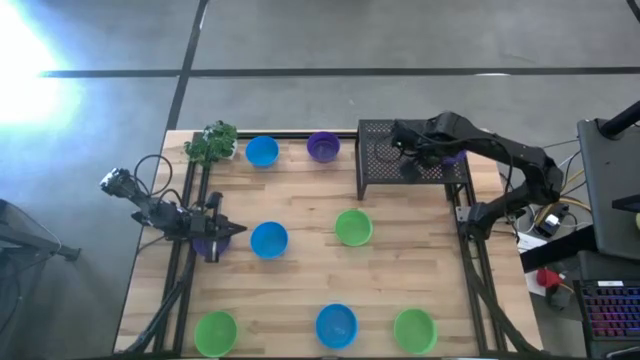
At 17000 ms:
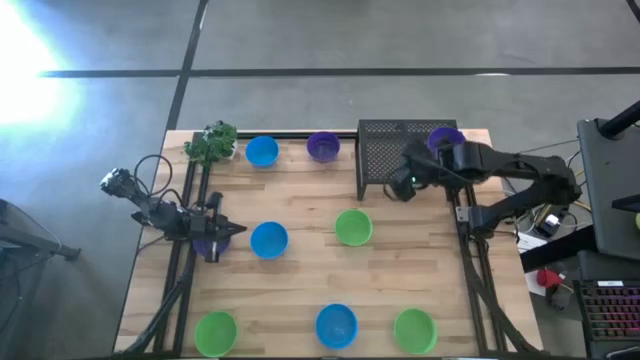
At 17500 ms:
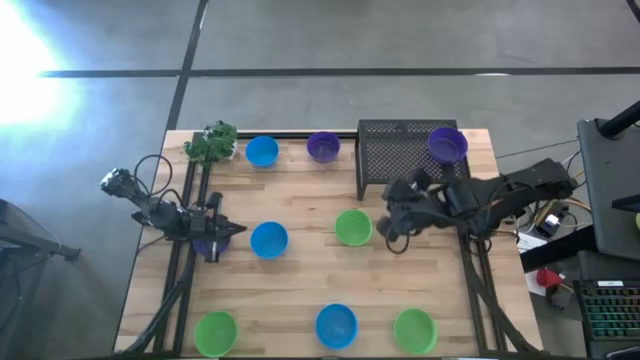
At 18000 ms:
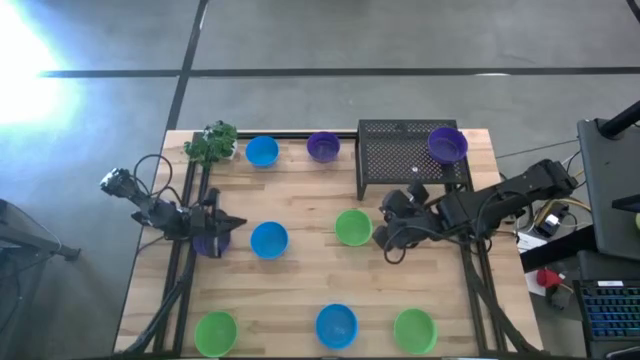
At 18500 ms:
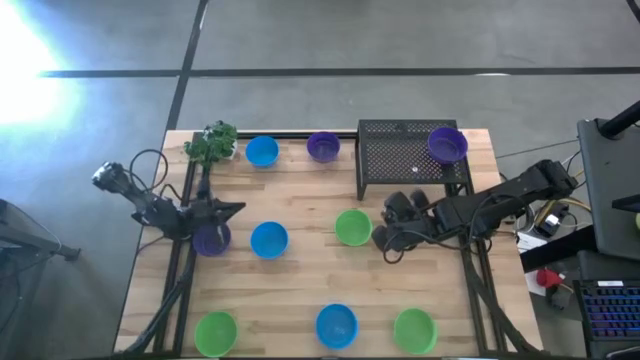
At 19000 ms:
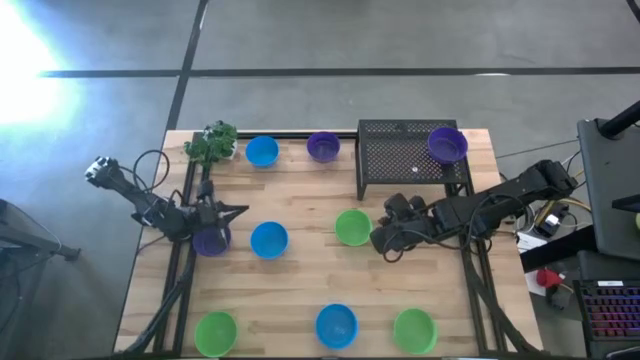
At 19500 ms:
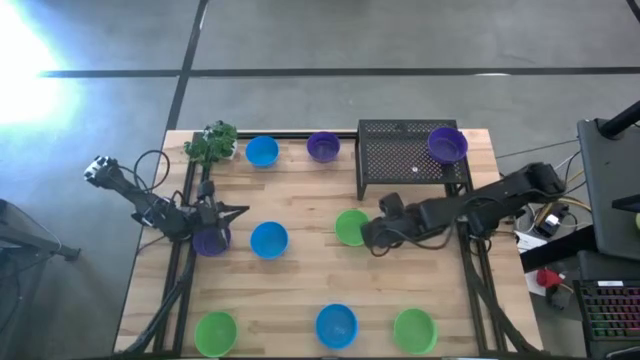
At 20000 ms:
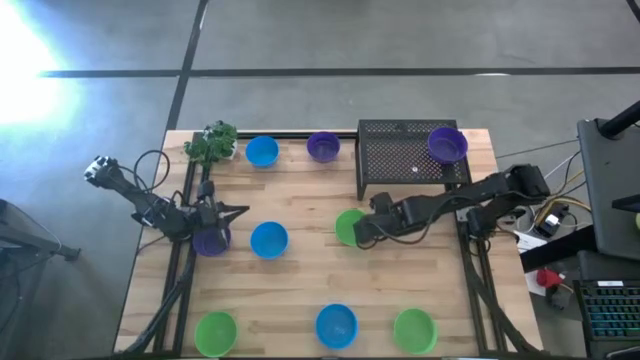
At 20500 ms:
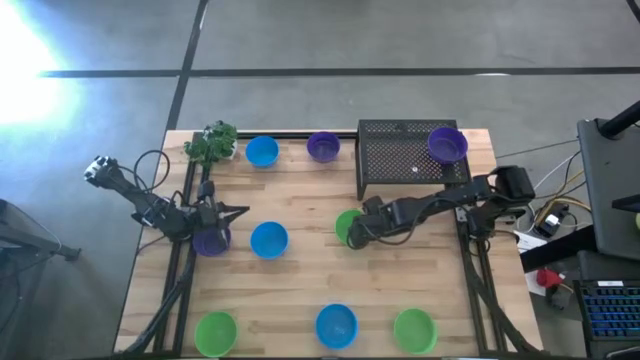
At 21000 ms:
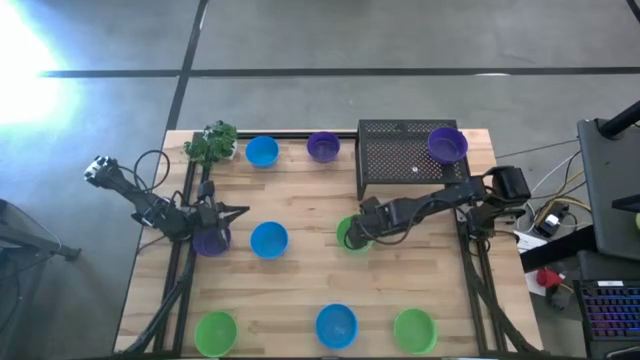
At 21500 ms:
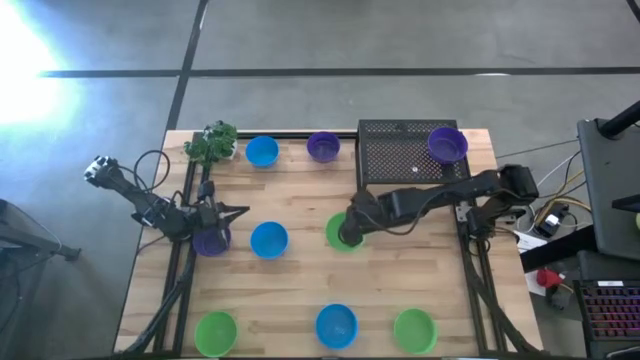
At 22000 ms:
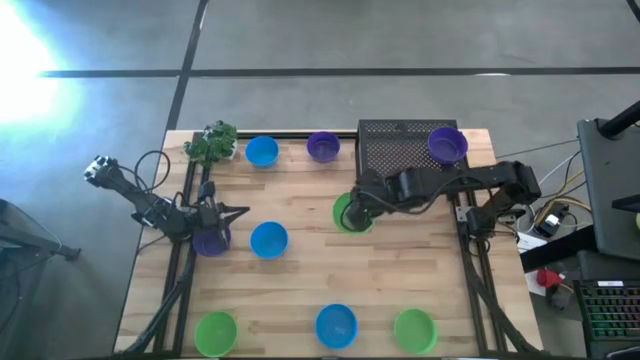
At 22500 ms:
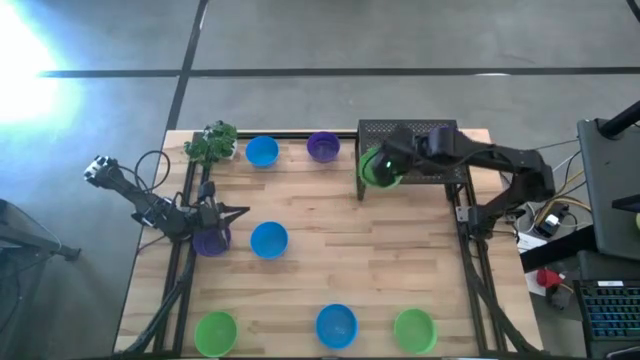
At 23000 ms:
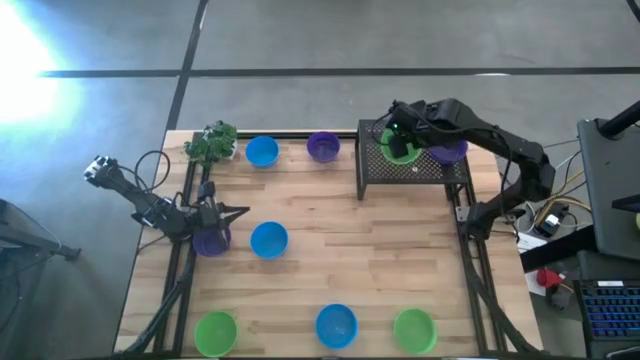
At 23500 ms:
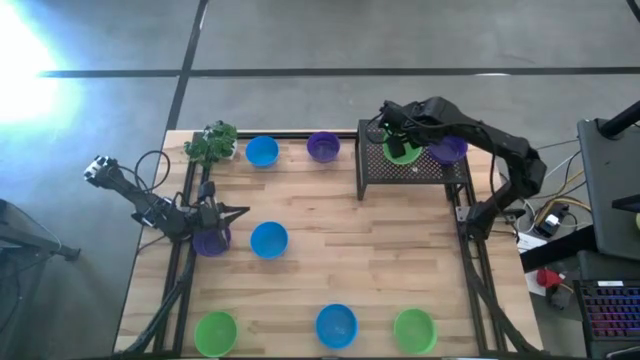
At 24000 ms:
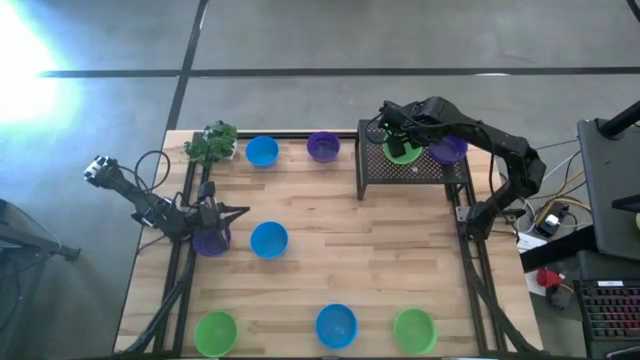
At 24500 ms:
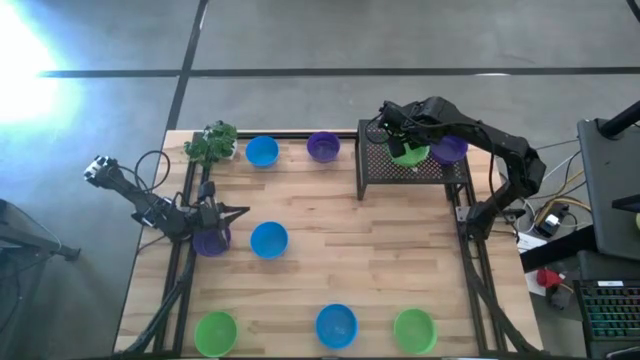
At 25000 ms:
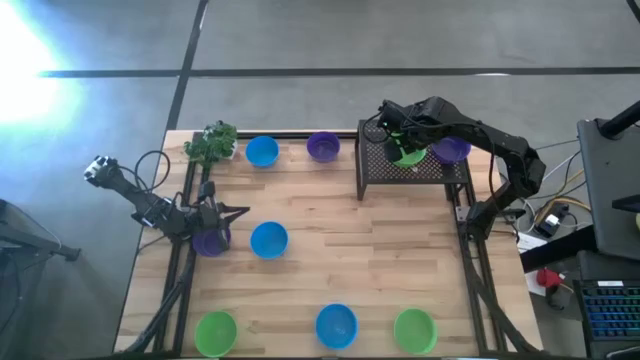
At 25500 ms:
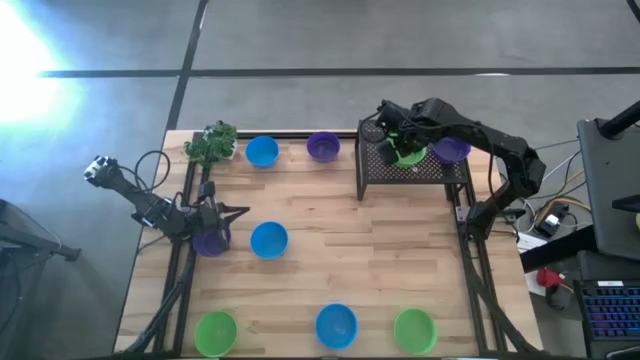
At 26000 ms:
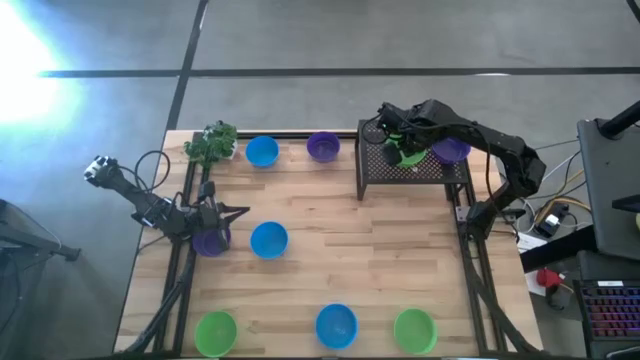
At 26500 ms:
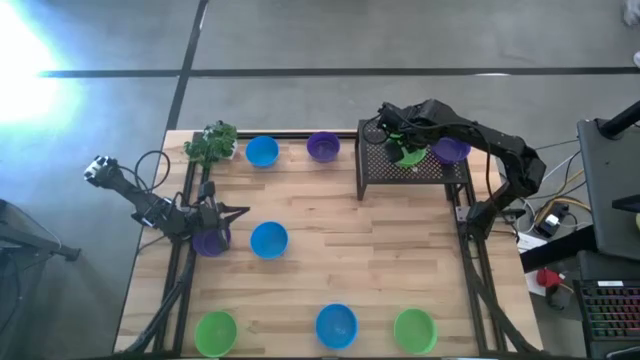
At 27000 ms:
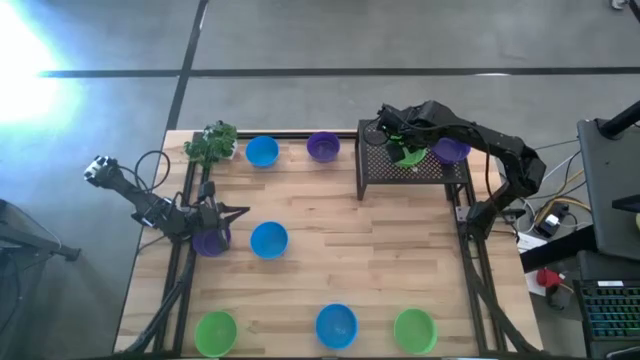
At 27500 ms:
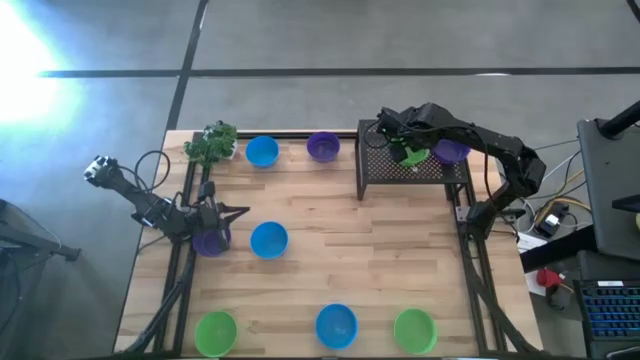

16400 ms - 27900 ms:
Task: Pick & Place Mini bowls
Put the top green bowl on the shelf
